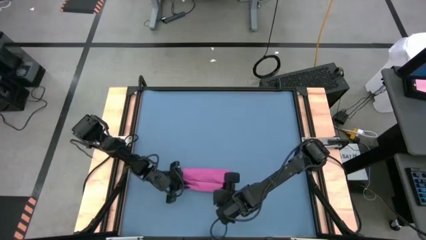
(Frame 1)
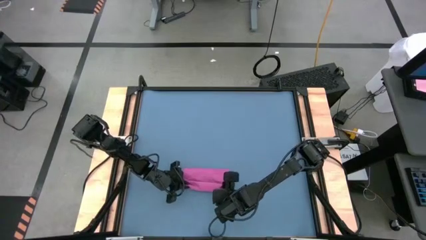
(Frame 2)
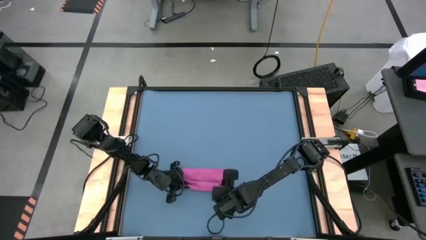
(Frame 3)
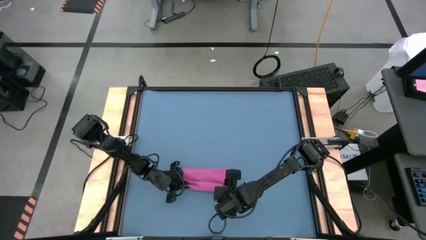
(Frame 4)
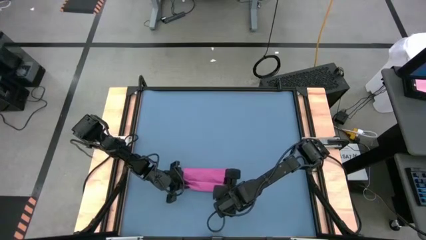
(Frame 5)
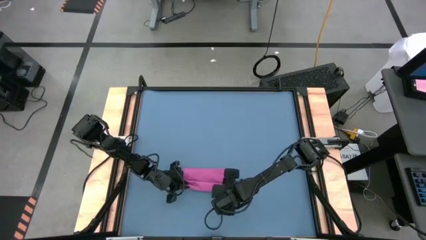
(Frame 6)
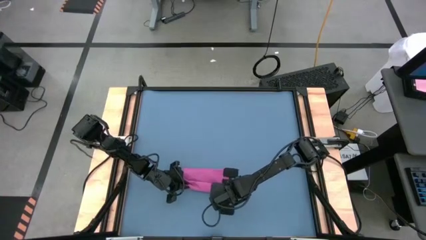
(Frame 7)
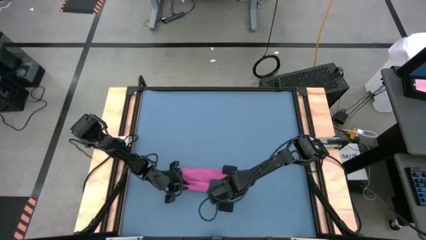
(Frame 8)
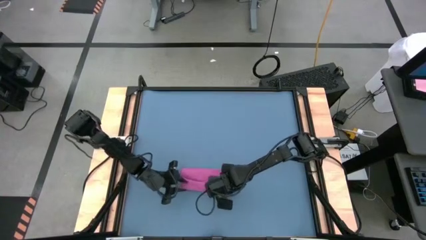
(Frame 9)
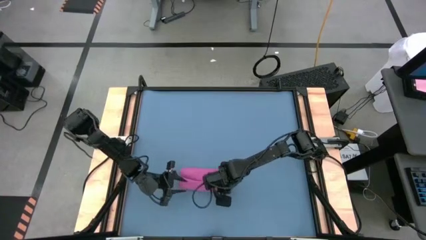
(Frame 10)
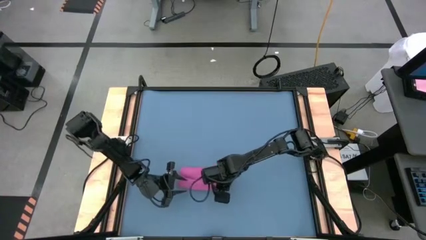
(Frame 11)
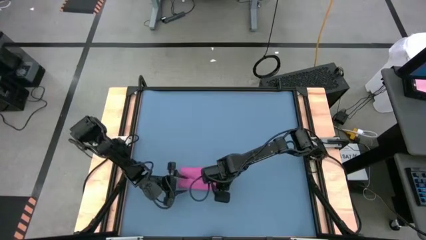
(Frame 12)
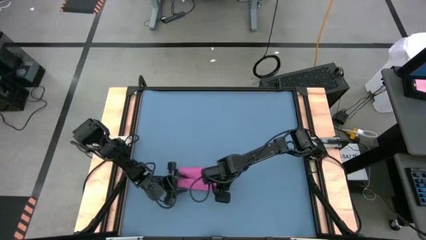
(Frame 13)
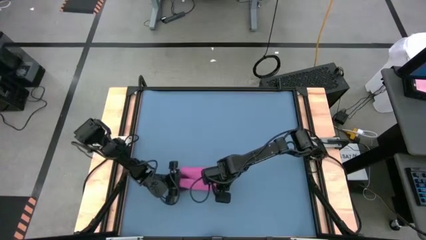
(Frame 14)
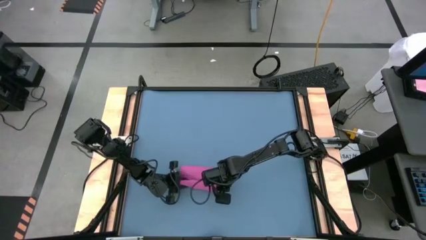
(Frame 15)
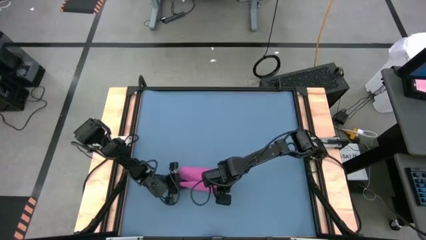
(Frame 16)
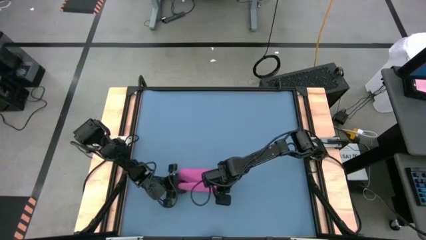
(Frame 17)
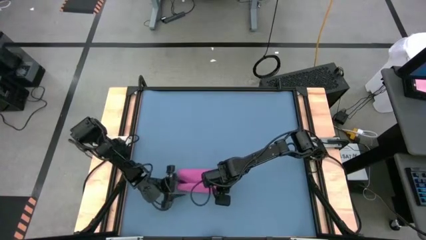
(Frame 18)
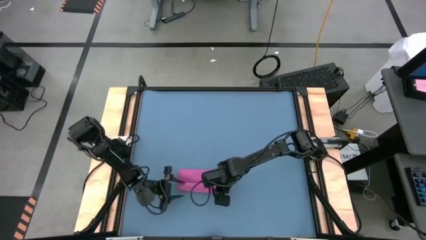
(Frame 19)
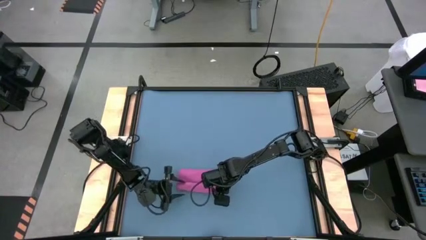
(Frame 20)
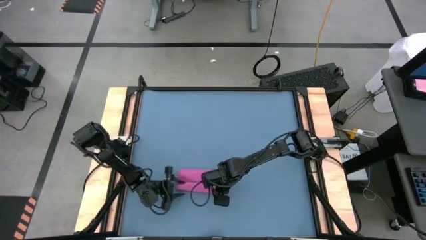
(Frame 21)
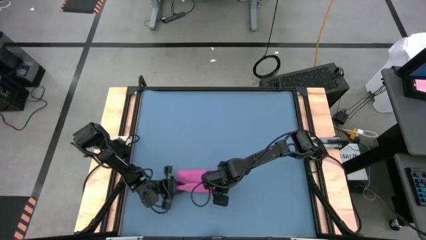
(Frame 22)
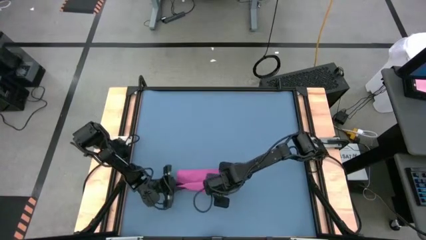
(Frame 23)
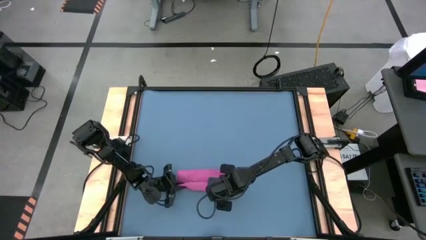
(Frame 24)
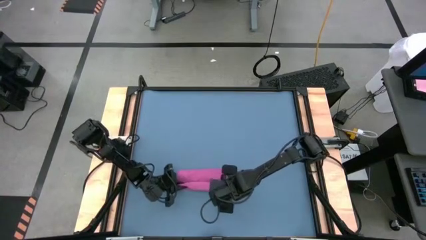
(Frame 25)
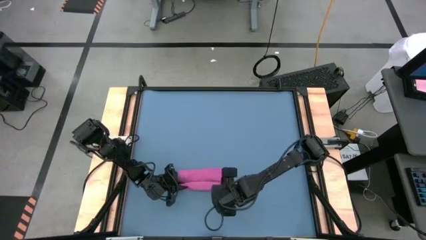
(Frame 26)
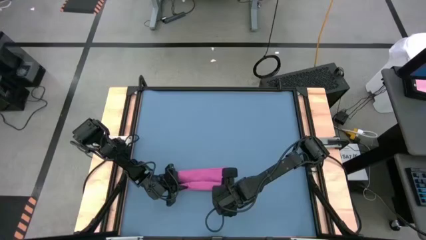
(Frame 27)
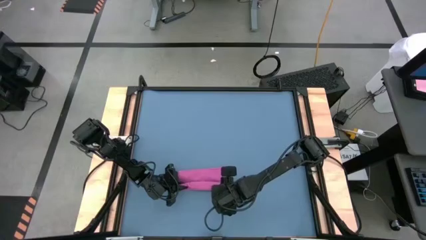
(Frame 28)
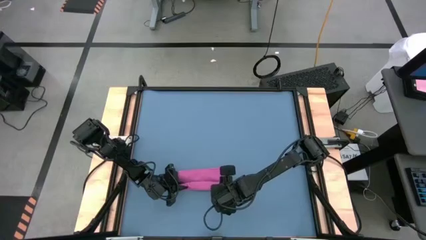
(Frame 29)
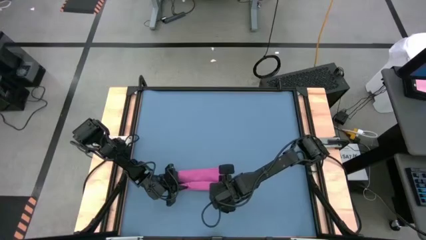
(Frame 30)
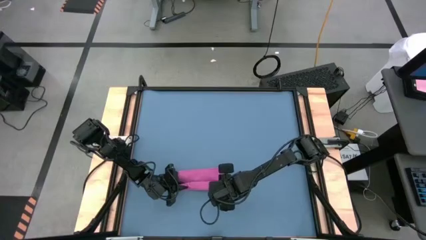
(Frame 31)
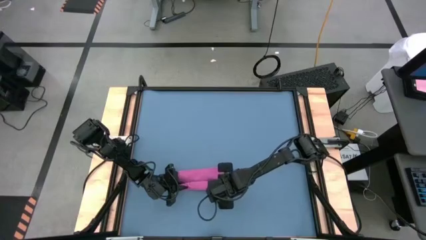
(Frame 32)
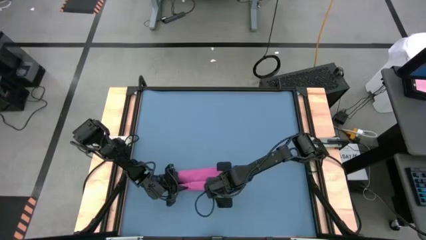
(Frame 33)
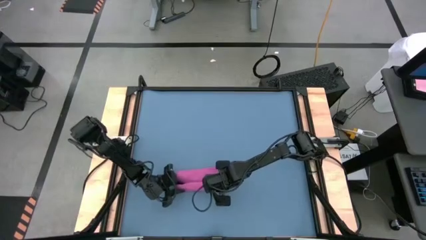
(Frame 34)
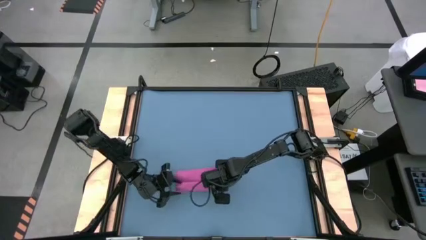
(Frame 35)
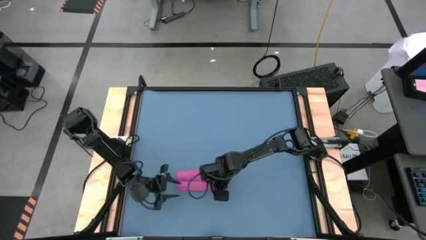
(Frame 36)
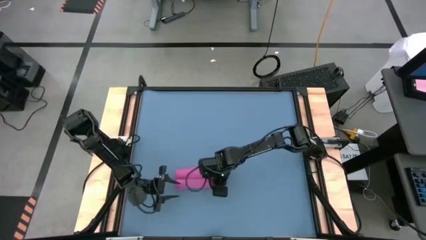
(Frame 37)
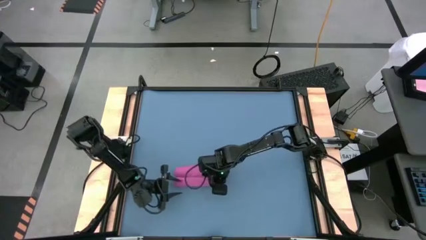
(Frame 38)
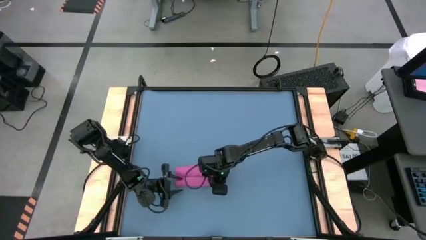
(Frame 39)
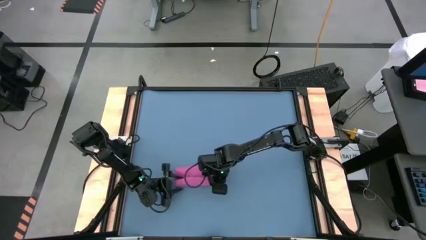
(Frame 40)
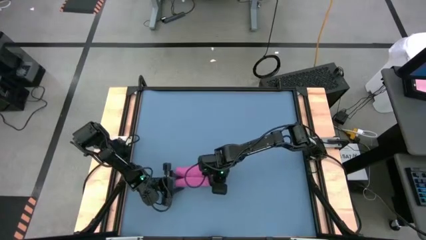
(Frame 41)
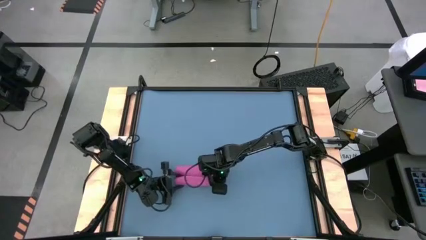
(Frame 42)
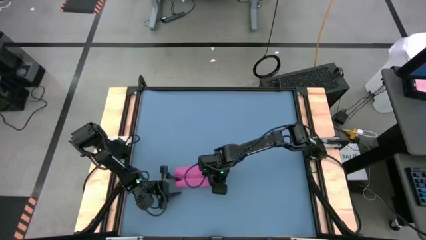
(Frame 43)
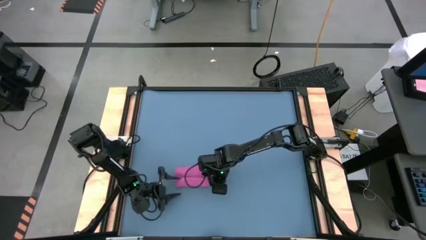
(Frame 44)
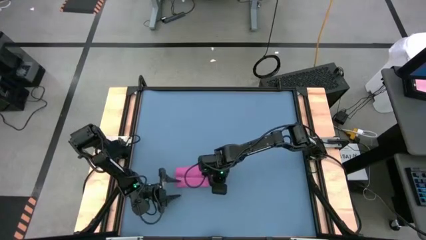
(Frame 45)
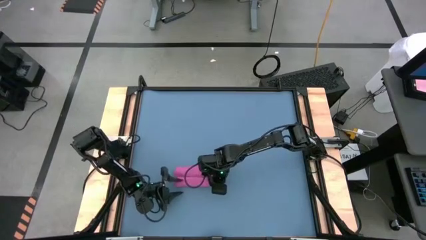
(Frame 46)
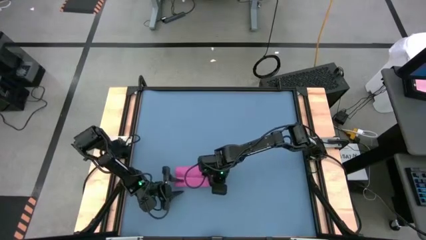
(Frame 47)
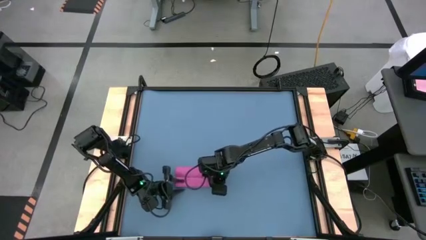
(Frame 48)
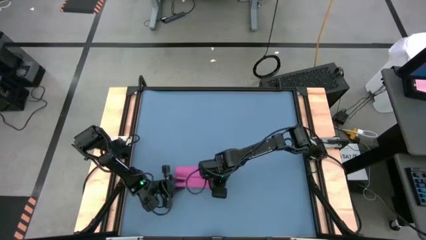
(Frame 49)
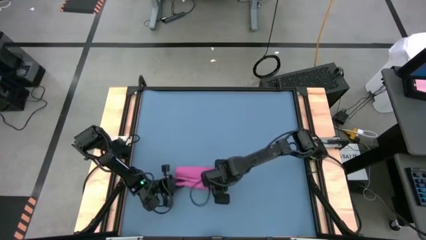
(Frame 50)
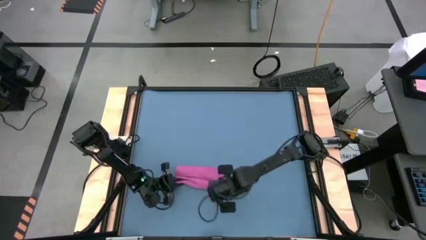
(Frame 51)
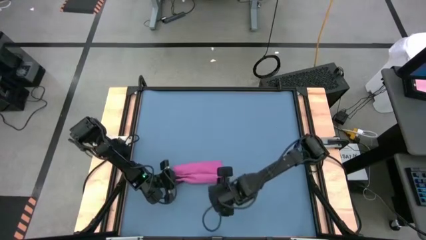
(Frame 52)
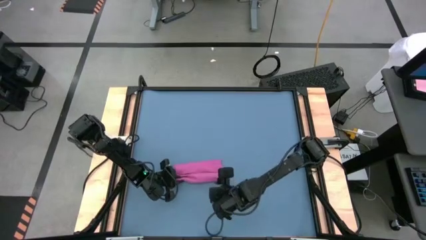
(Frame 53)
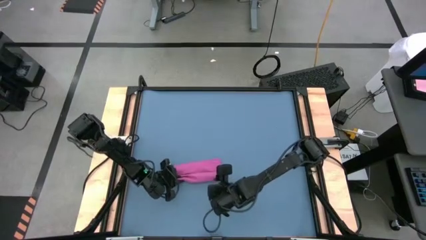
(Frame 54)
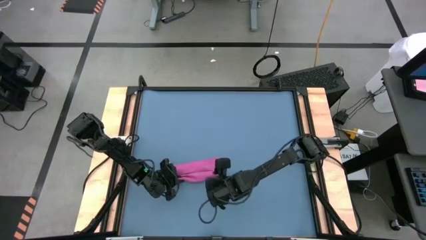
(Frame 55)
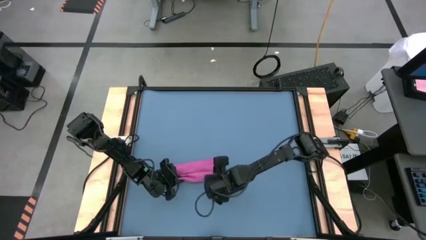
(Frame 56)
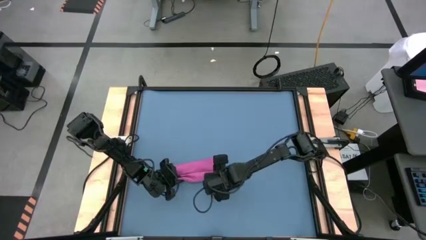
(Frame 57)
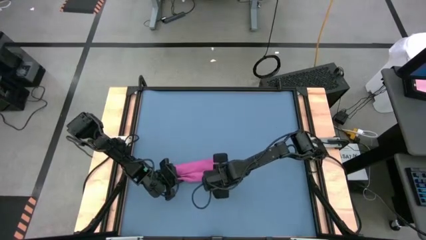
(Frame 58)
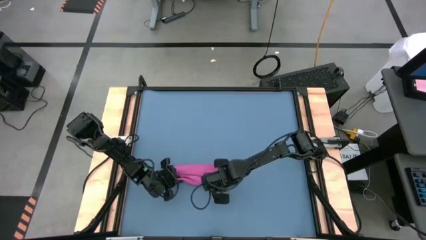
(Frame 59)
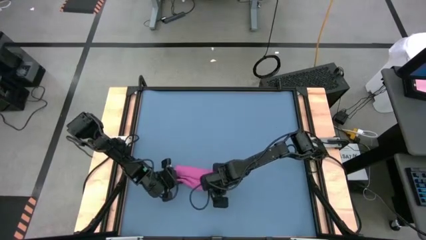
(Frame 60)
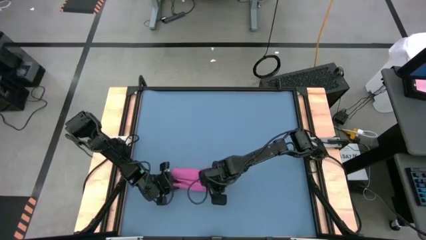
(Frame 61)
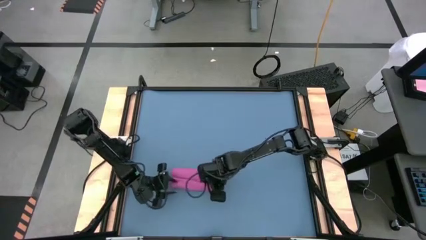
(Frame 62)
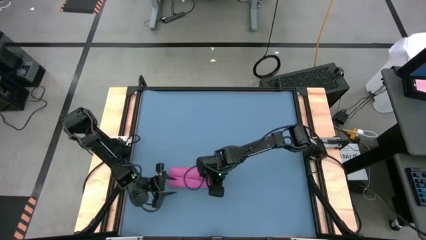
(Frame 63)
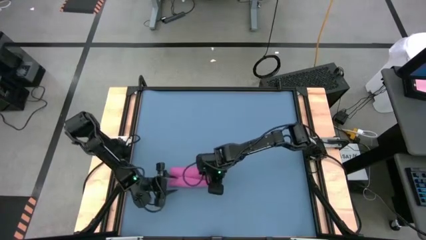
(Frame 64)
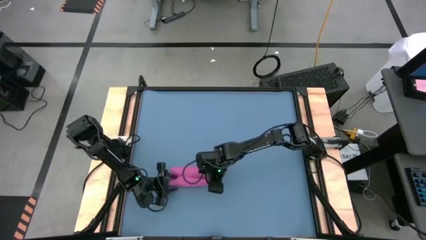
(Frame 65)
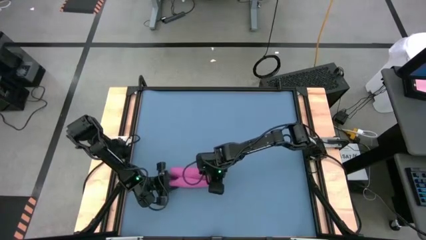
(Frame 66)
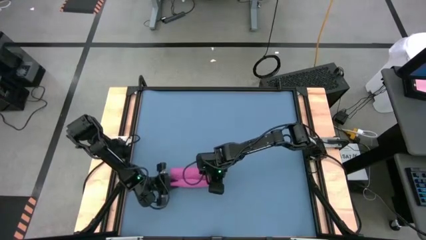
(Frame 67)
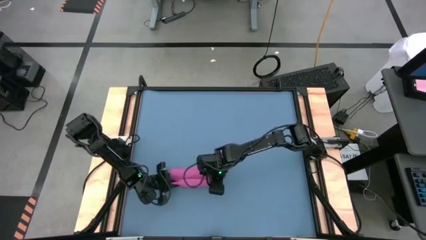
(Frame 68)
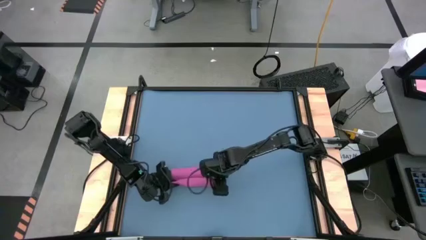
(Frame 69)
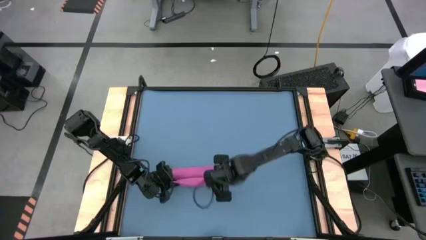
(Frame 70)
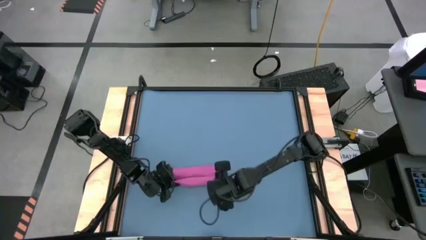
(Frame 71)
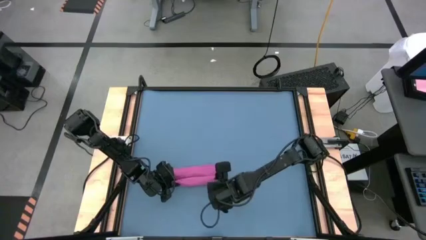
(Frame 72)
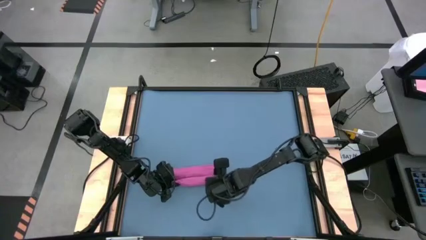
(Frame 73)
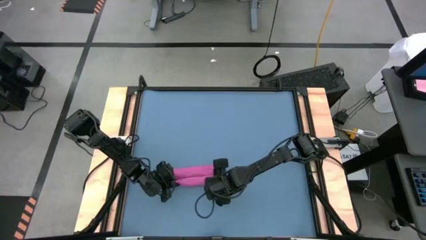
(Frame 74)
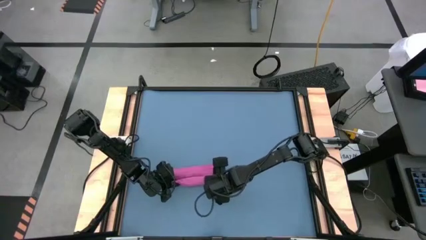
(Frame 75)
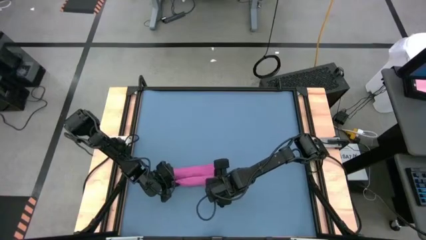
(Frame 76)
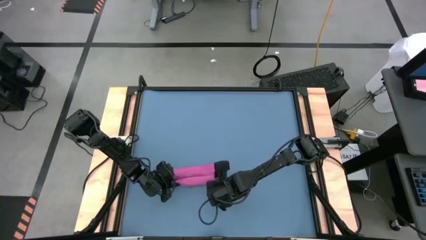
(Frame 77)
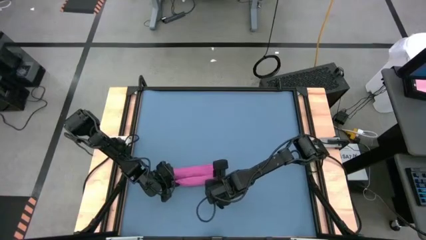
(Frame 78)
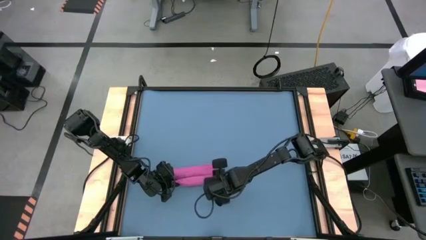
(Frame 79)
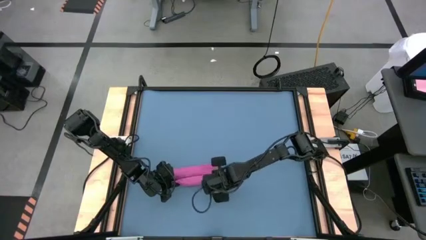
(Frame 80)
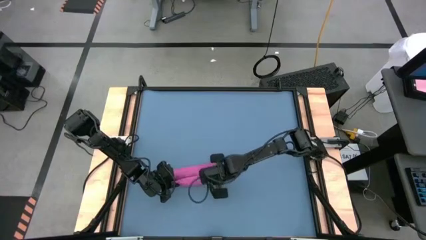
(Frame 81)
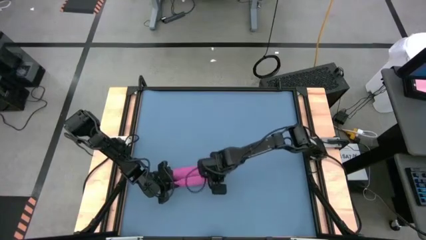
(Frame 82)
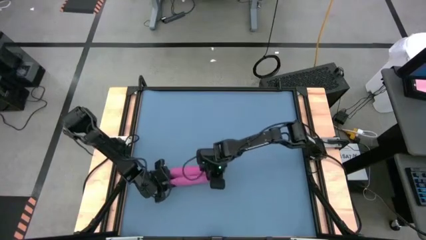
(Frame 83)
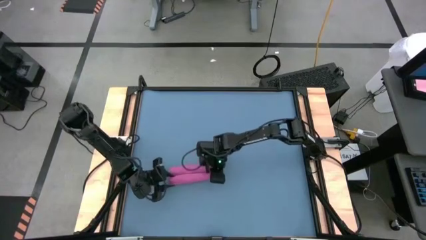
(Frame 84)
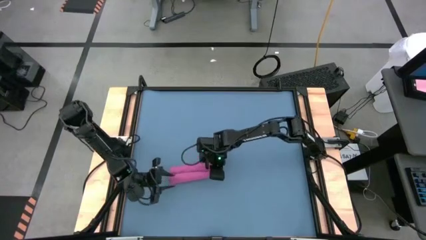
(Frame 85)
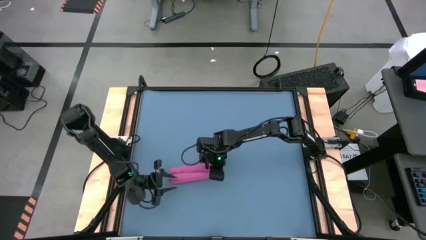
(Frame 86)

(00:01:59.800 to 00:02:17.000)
Task: Roll towel
Roll the light red towel
